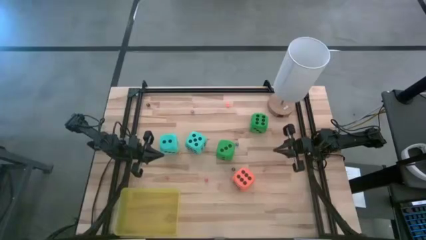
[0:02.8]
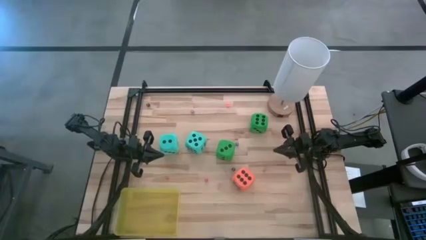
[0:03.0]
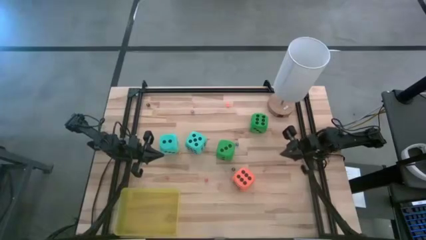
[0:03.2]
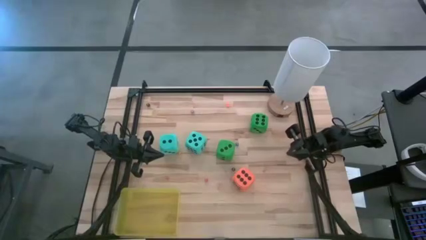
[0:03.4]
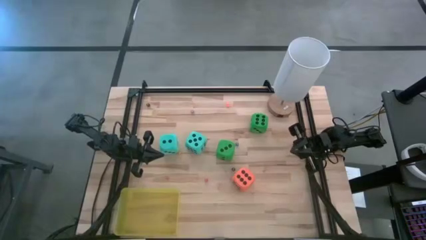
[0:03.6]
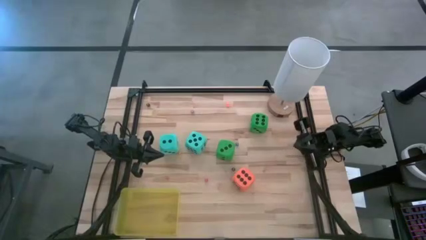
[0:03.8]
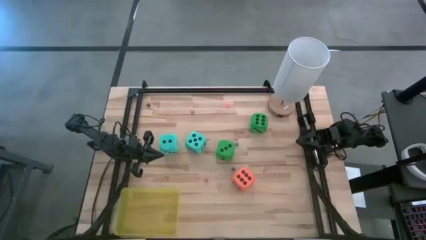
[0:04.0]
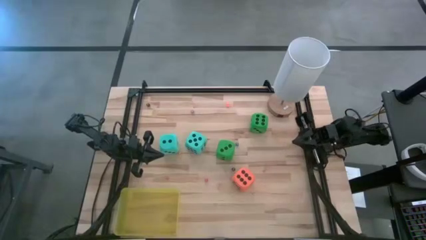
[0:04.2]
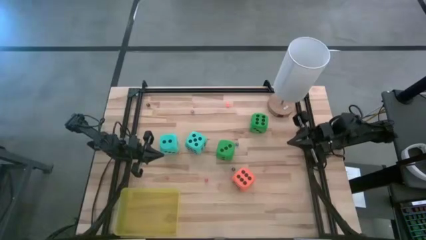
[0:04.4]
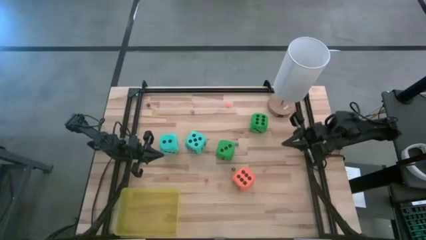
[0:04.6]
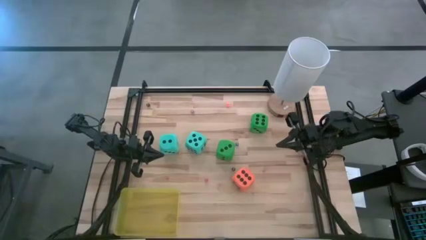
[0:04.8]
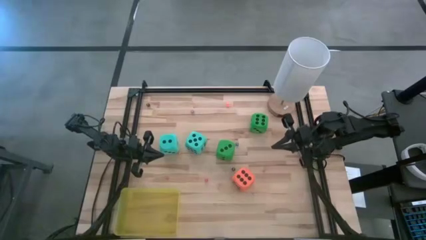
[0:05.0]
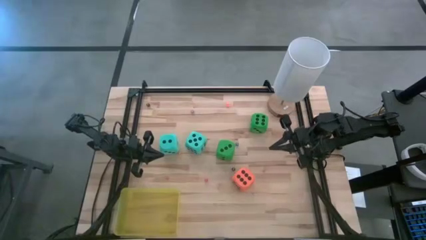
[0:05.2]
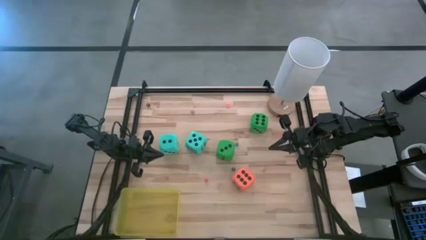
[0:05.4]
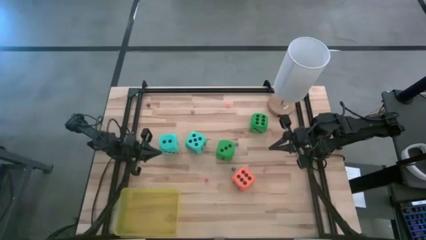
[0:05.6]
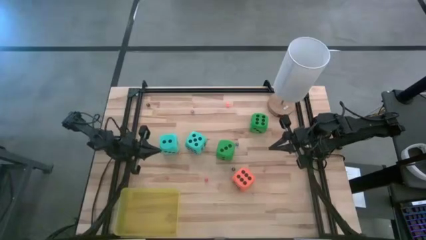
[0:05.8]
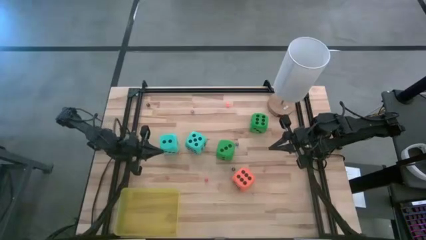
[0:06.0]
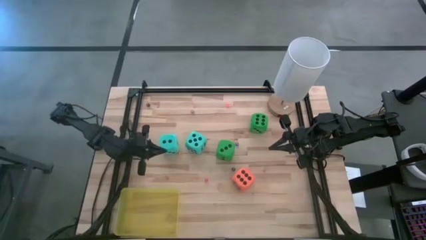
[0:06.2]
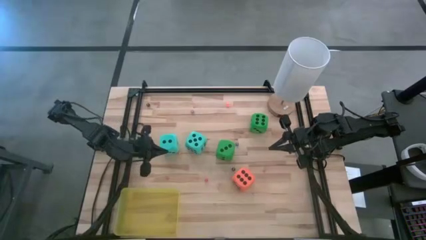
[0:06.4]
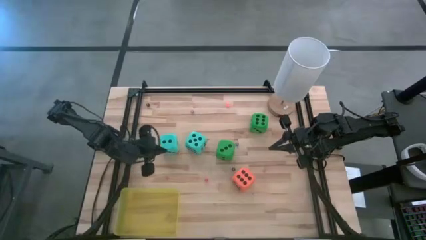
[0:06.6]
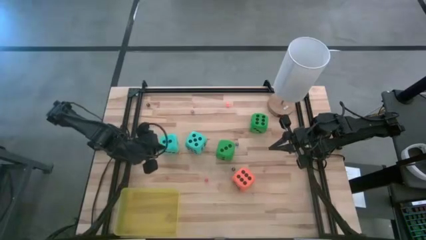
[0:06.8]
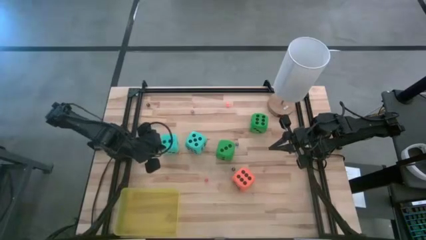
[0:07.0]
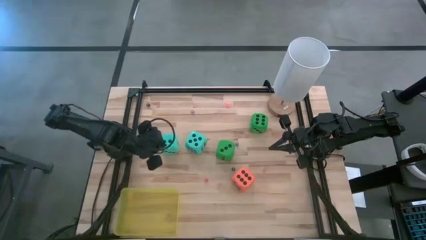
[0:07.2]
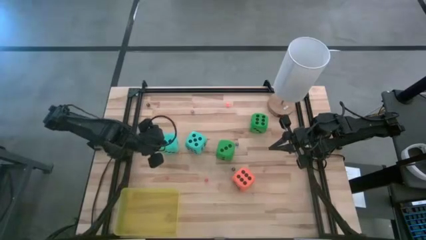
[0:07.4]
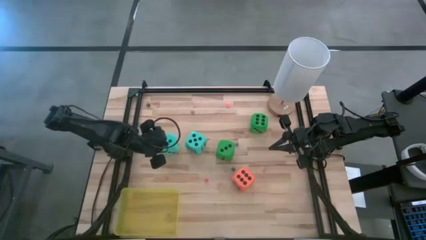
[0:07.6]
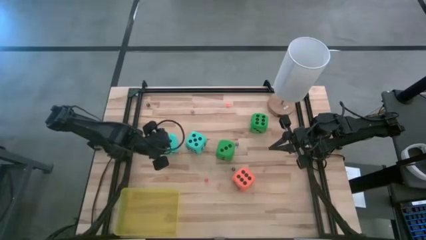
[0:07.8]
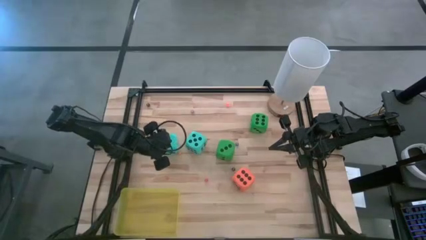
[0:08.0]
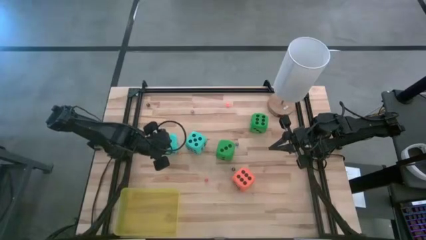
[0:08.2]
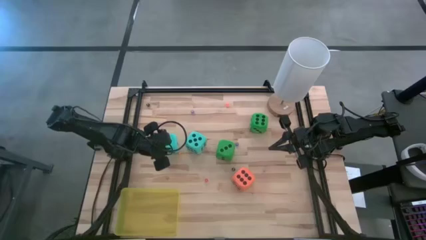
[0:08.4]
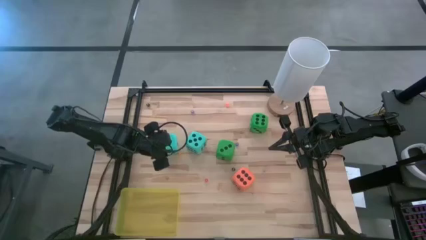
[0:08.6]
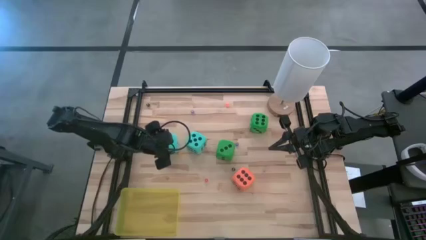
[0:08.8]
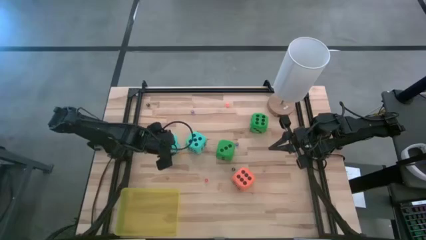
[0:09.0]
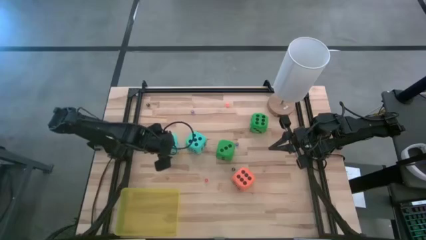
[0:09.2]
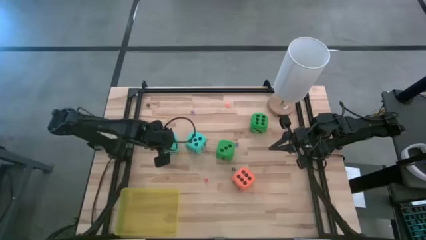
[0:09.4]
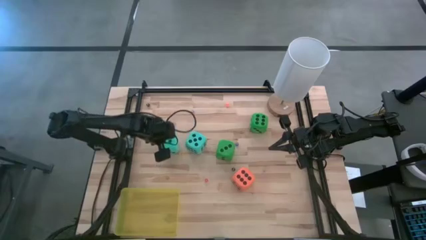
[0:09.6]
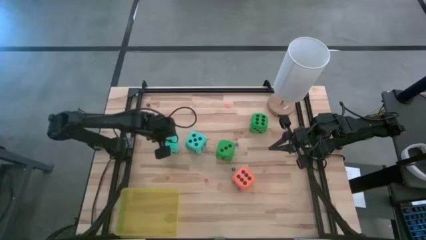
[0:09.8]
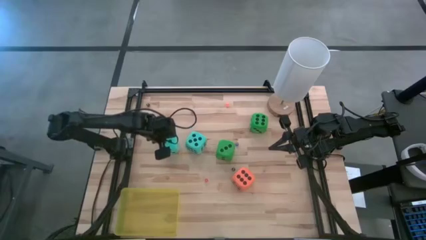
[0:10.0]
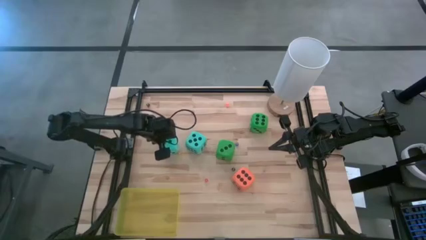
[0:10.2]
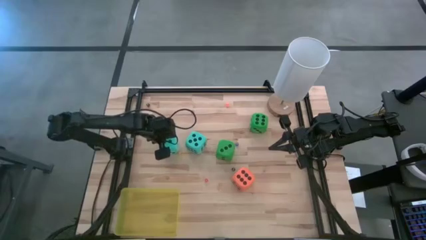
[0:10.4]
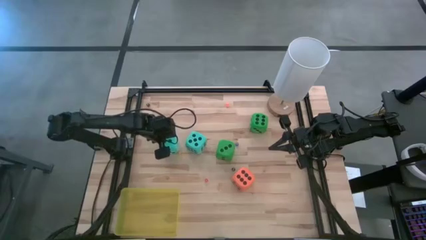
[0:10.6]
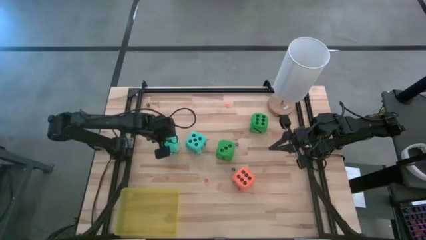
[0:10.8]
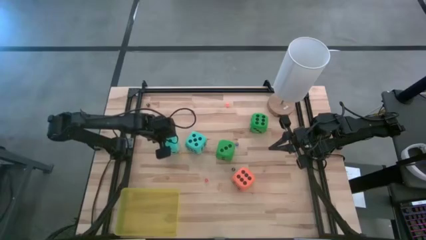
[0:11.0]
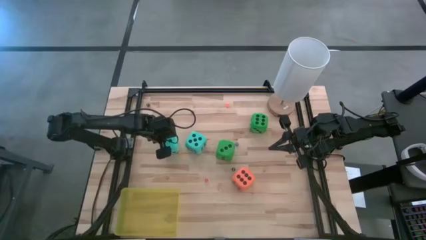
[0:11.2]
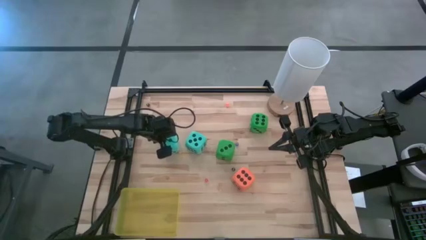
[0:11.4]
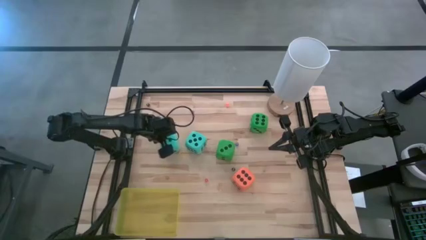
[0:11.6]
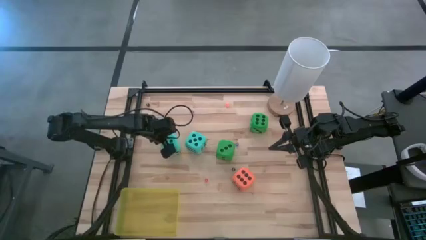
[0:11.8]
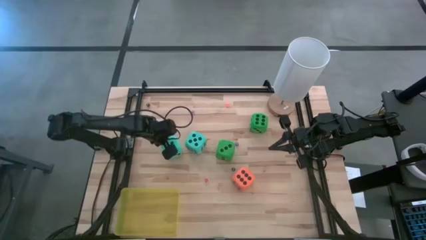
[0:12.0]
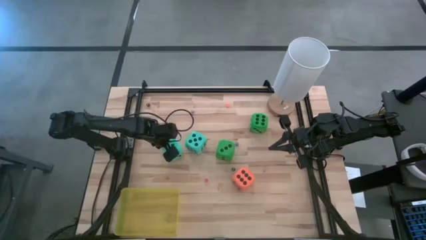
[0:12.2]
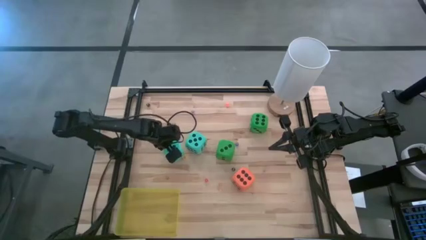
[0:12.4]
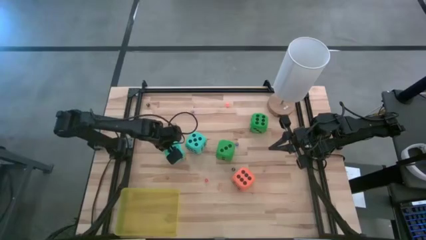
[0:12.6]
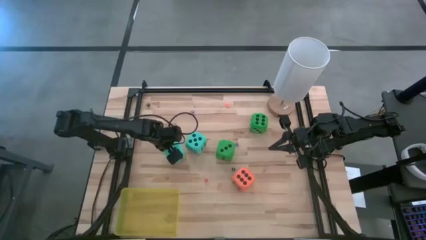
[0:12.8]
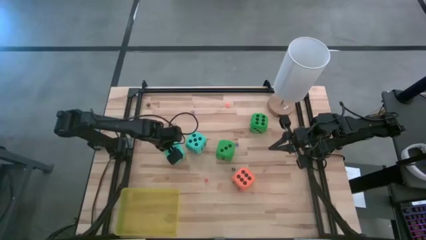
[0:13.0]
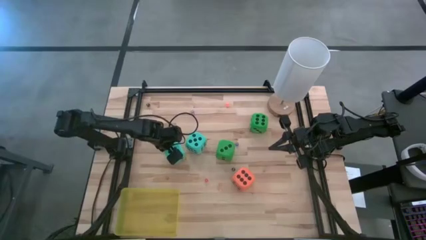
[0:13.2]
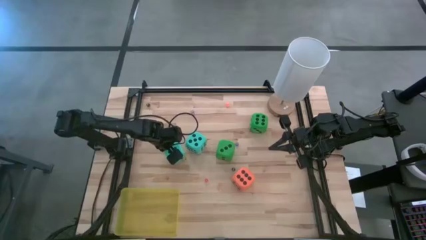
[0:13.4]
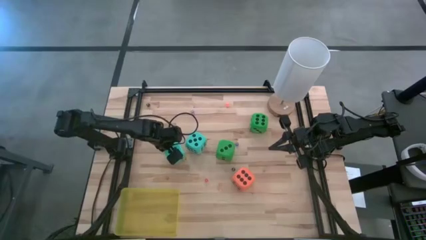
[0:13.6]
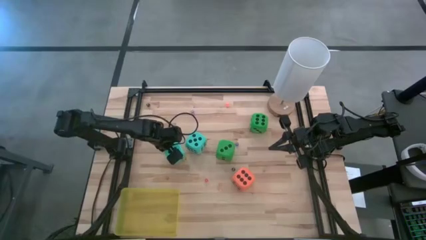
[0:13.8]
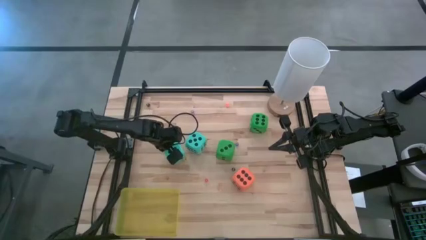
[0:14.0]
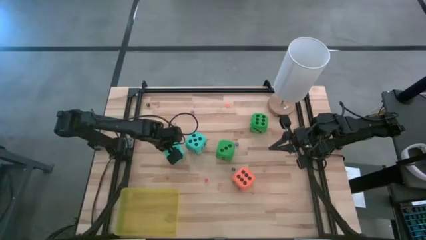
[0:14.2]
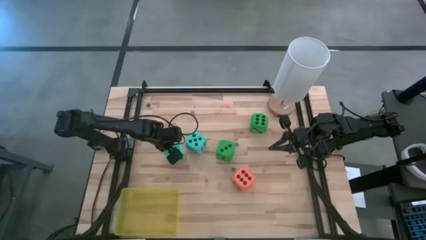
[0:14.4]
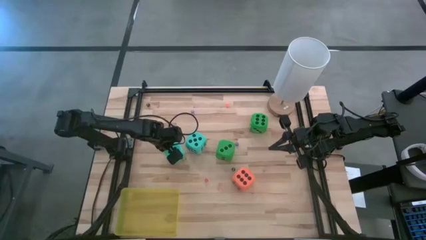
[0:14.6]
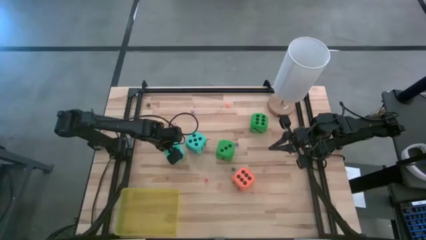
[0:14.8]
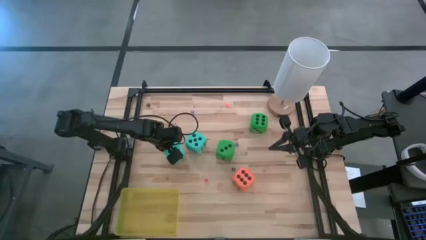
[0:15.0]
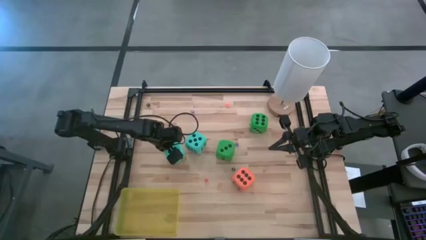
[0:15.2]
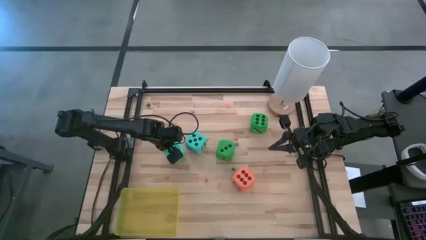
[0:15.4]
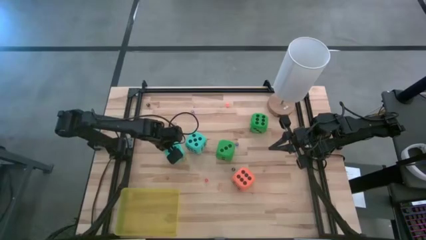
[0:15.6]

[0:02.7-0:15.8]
Task: Pick & Place Dice
Put the left large blue dice into the yellow bin
